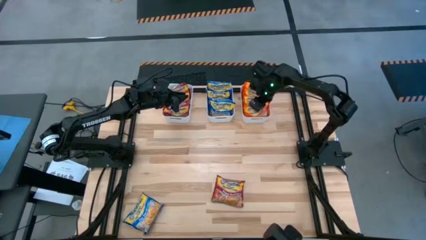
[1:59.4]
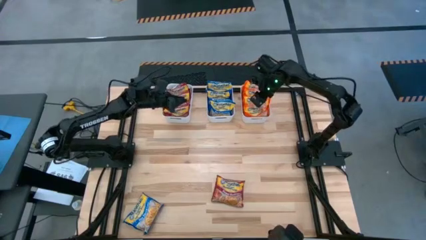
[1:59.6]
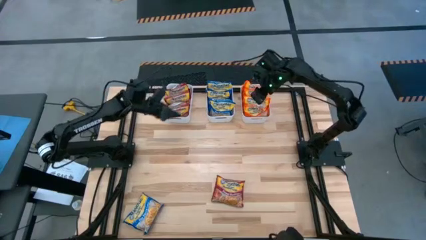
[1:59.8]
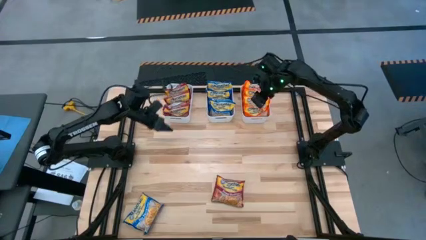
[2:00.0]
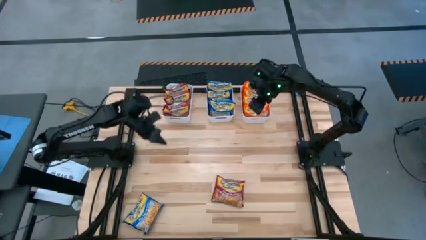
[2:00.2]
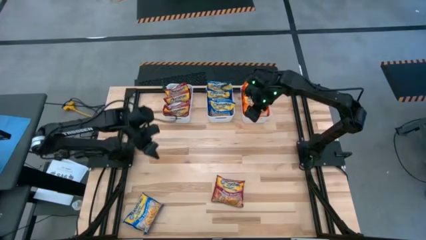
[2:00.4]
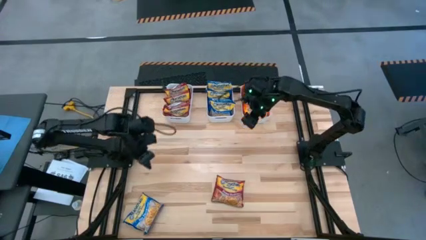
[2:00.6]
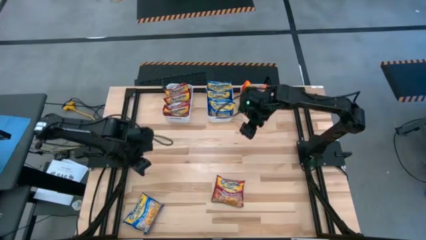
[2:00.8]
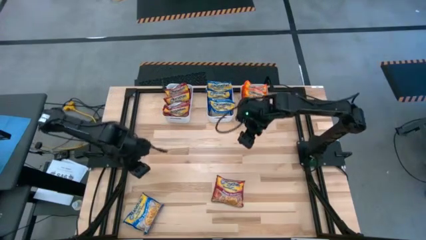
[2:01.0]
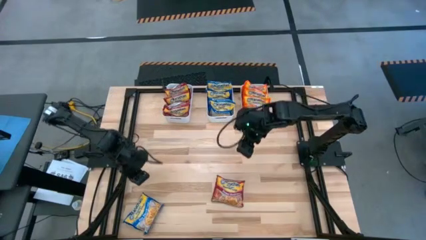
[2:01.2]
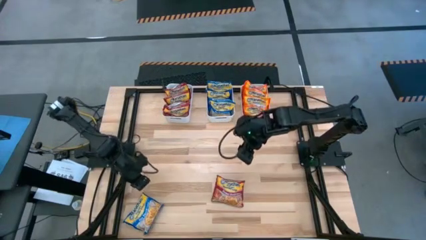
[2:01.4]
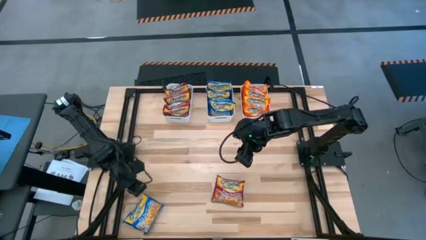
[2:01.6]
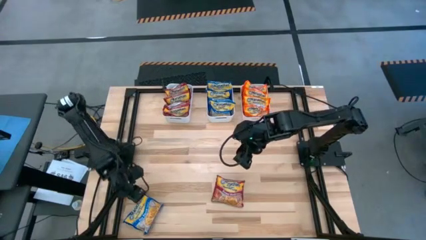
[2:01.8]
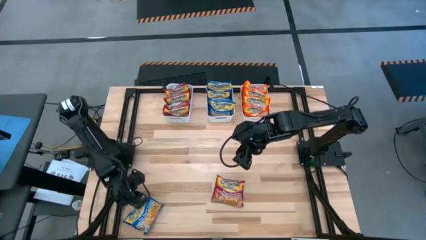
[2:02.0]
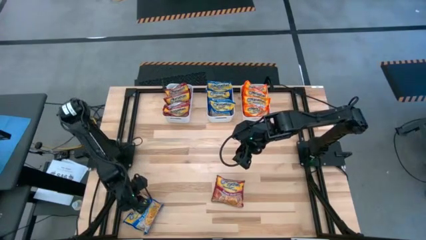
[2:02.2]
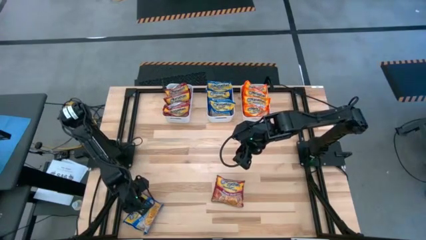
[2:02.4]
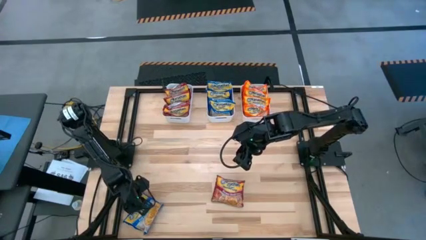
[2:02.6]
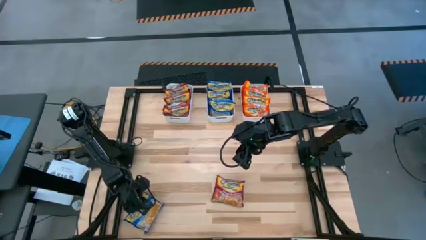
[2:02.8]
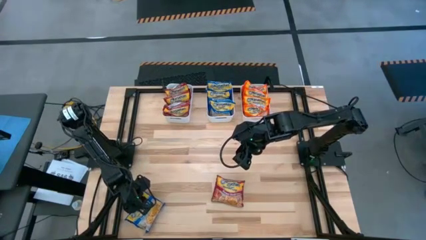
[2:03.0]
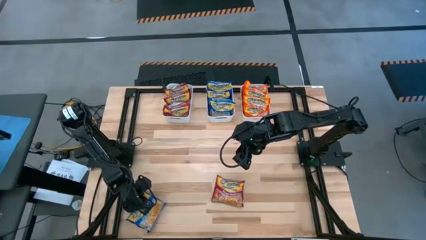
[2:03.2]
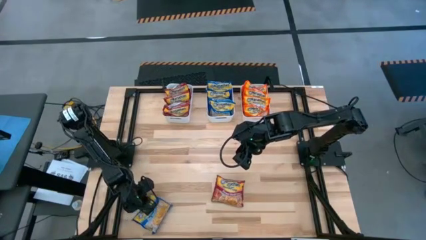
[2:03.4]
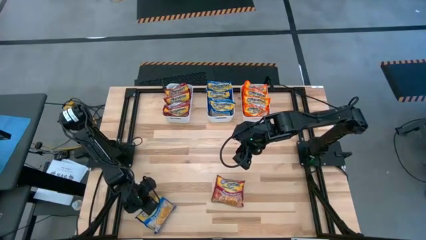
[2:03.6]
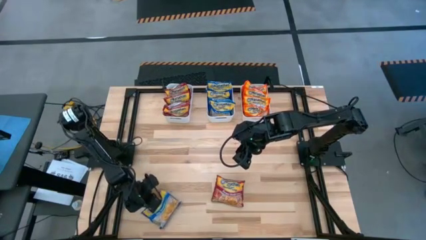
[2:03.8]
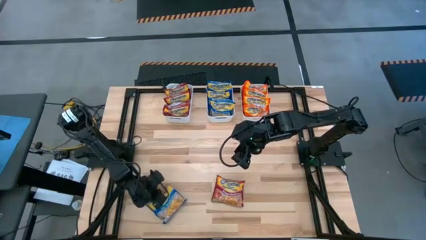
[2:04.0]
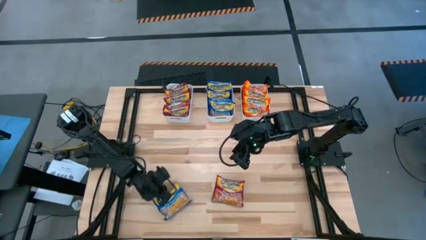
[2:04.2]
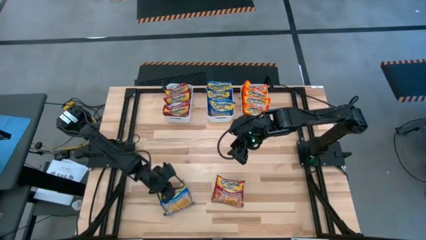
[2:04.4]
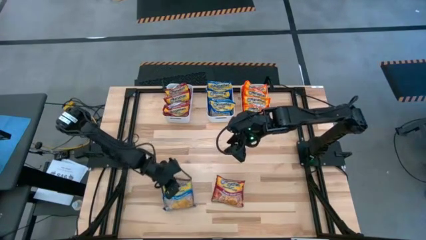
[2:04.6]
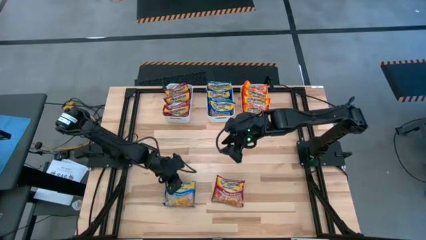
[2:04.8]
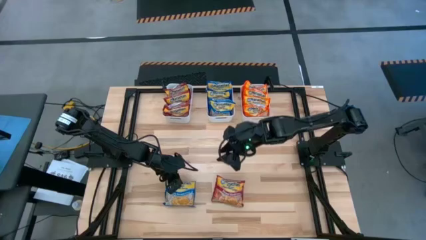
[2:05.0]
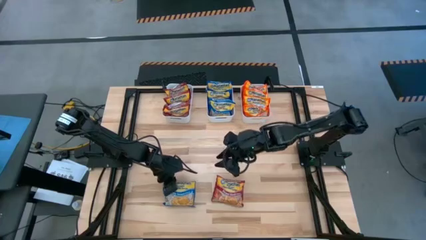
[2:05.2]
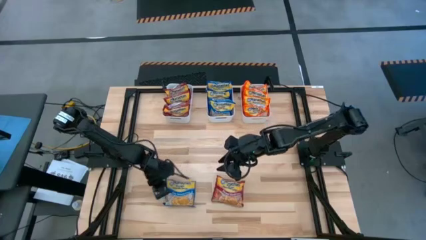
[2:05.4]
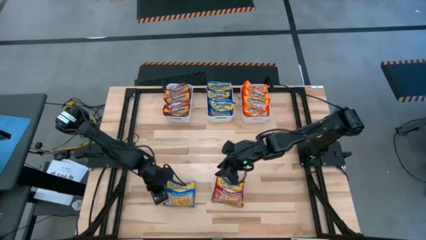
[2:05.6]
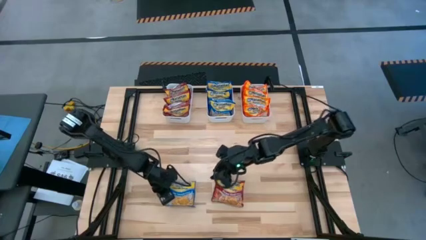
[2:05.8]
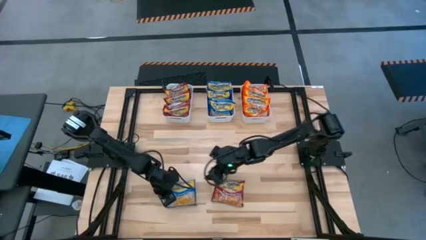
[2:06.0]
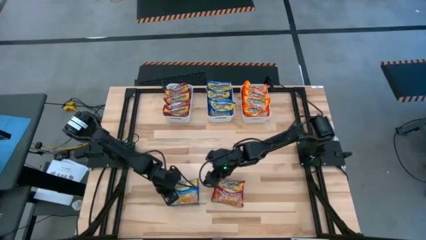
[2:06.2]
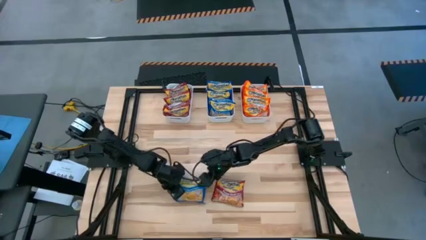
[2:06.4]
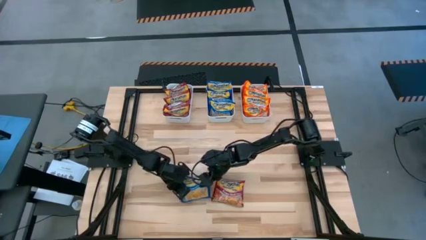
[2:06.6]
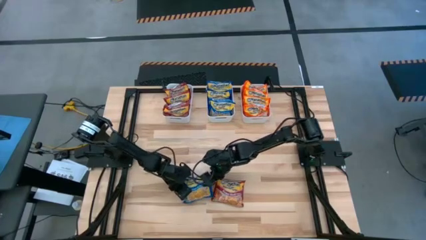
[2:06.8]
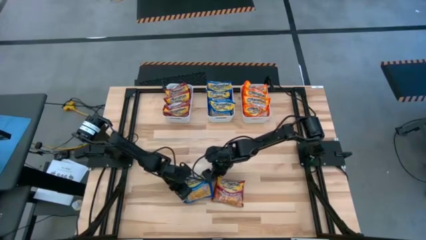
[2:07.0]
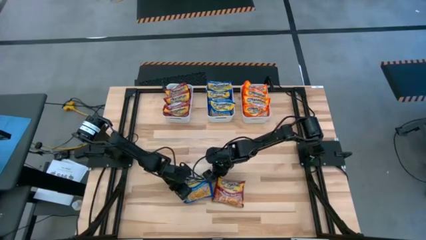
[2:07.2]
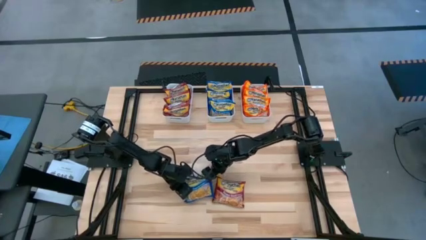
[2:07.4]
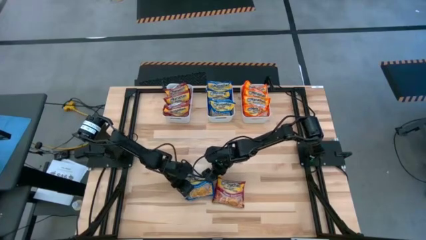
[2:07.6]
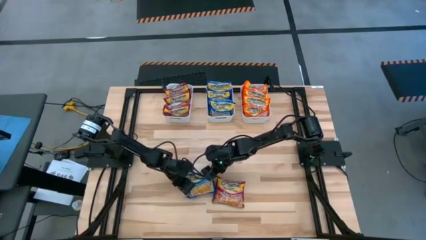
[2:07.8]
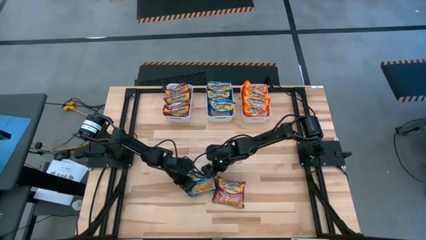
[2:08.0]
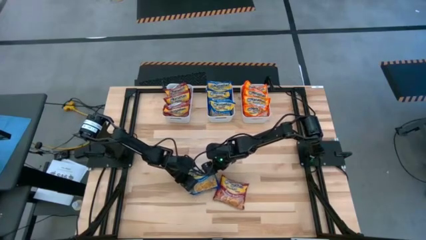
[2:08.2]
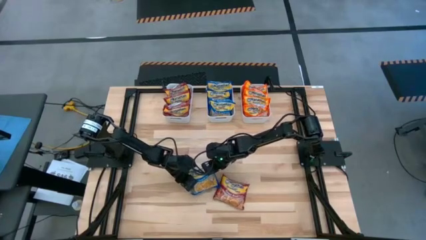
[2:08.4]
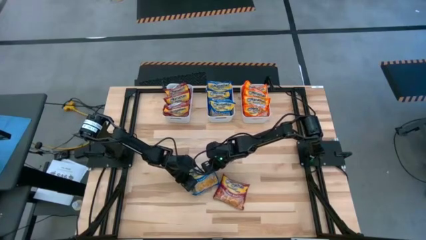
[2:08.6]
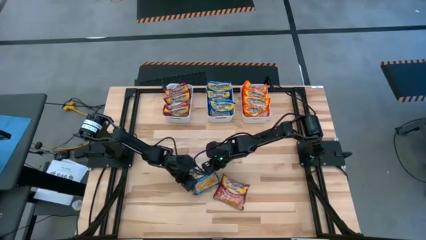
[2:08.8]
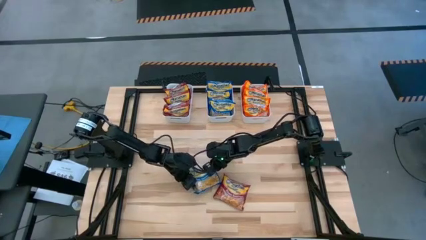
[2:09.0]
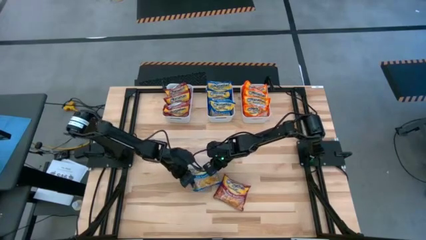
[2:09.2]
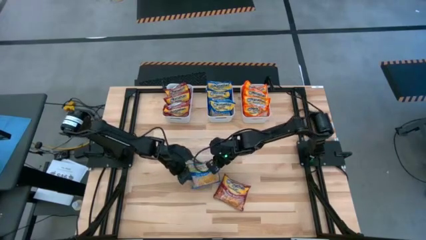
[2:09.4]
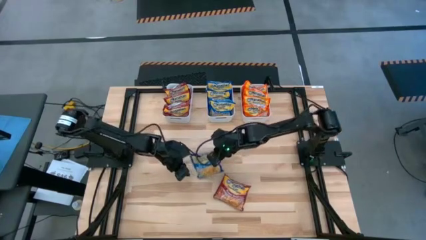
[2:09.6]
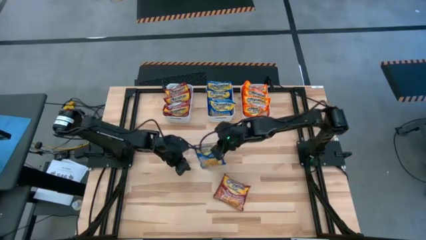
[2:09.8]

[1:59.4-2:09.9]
Task: Sort Maruchan noodles
Put the blue noodle pack into the top middle white bin

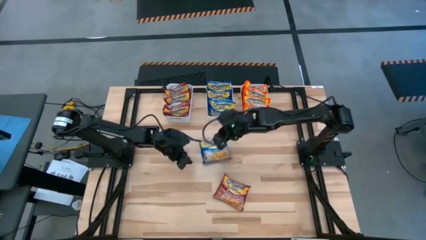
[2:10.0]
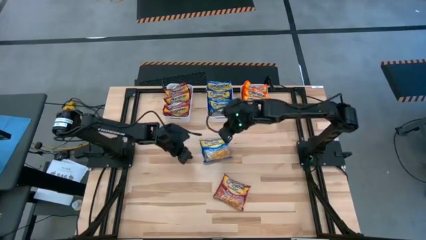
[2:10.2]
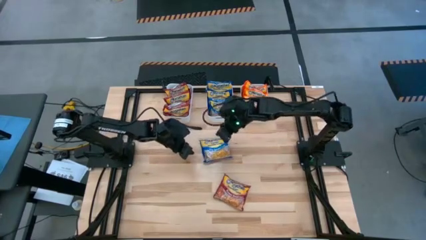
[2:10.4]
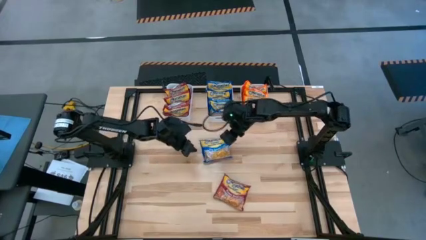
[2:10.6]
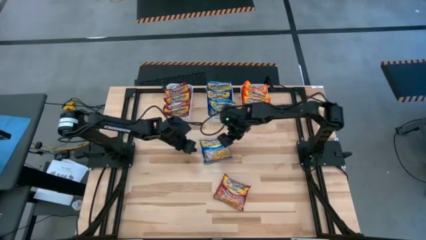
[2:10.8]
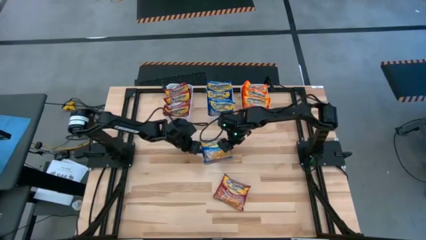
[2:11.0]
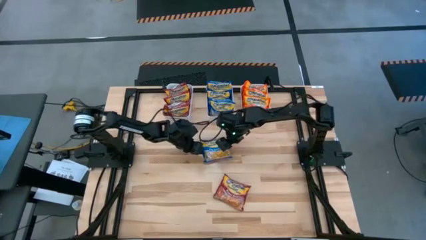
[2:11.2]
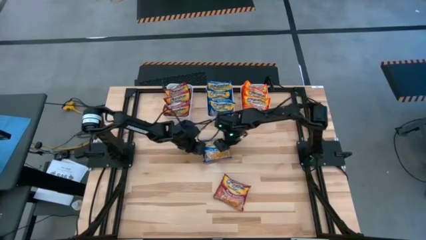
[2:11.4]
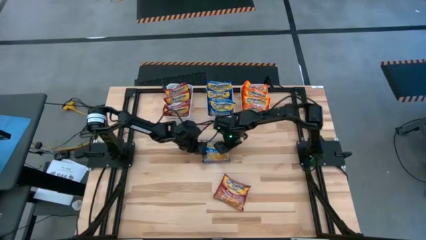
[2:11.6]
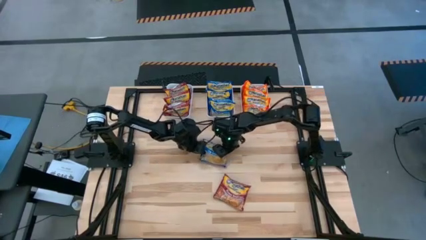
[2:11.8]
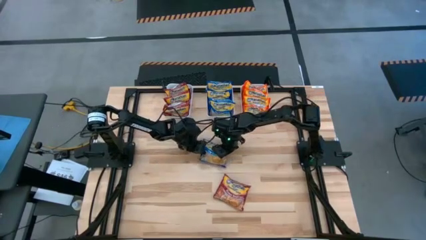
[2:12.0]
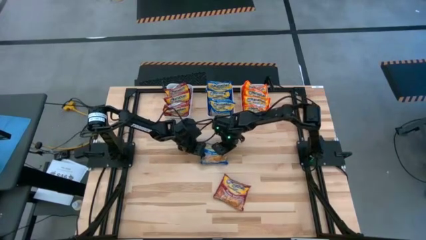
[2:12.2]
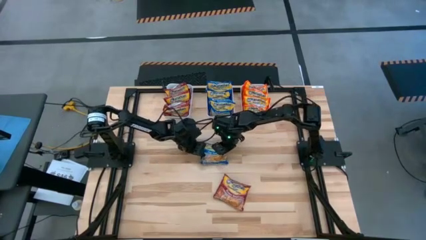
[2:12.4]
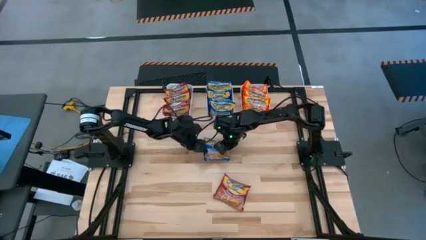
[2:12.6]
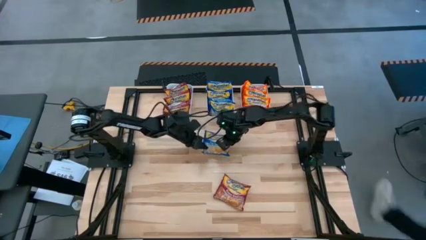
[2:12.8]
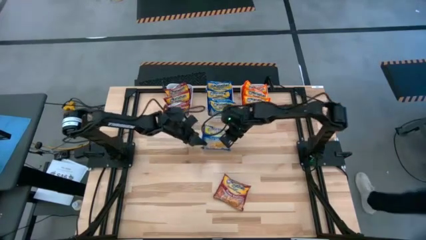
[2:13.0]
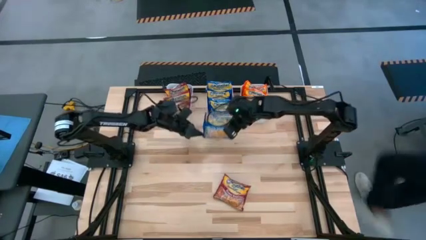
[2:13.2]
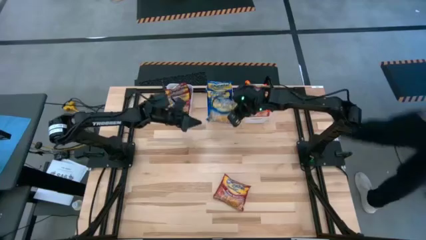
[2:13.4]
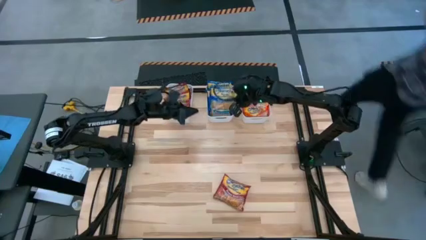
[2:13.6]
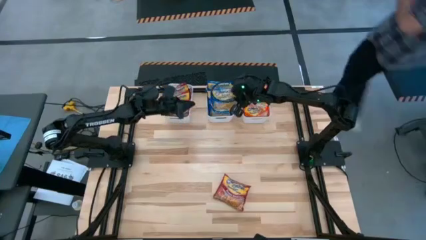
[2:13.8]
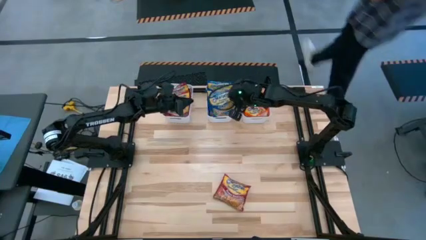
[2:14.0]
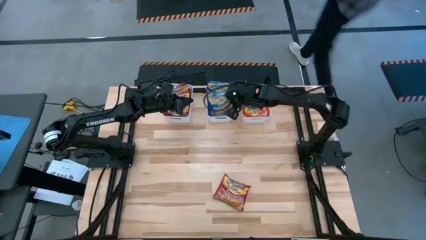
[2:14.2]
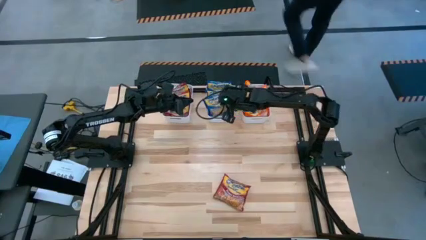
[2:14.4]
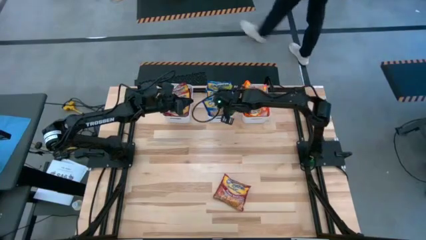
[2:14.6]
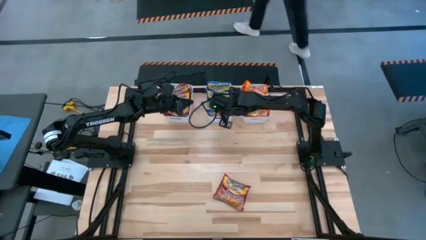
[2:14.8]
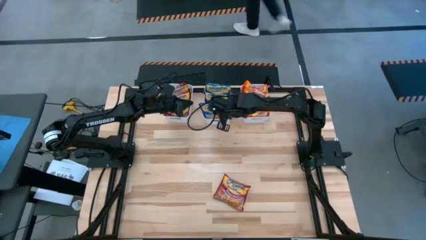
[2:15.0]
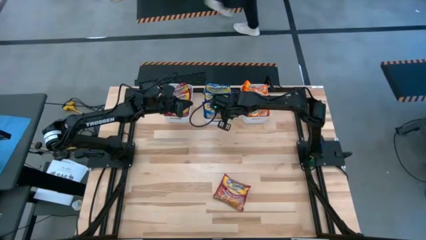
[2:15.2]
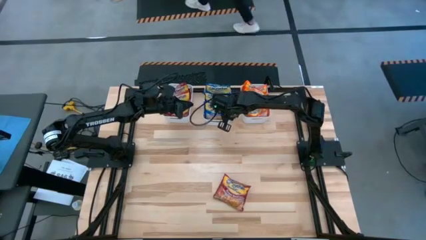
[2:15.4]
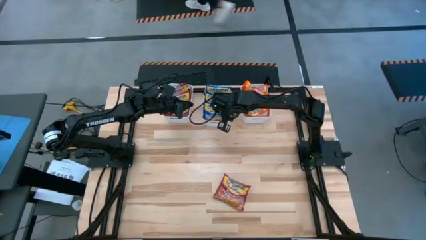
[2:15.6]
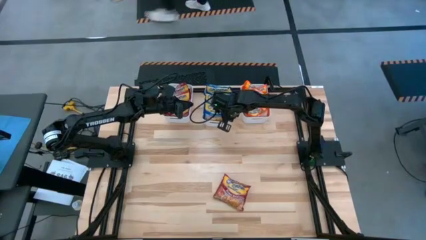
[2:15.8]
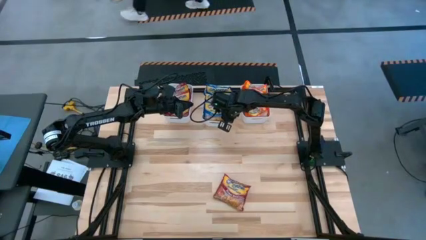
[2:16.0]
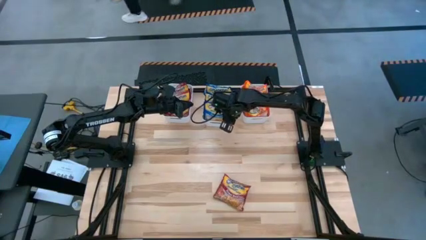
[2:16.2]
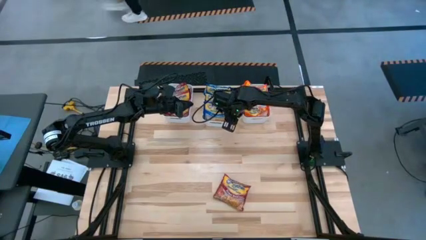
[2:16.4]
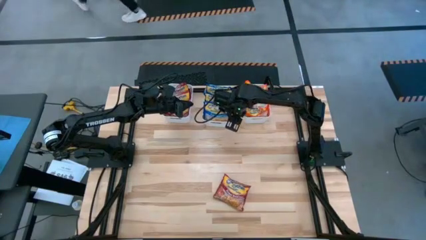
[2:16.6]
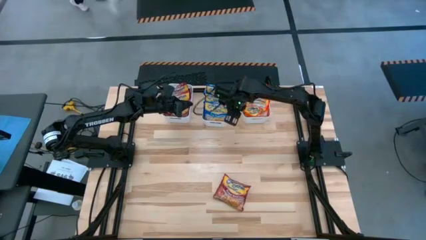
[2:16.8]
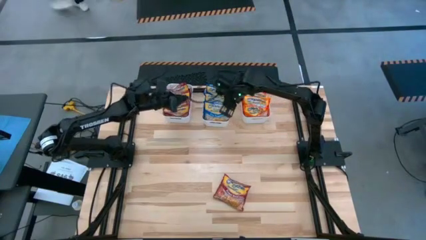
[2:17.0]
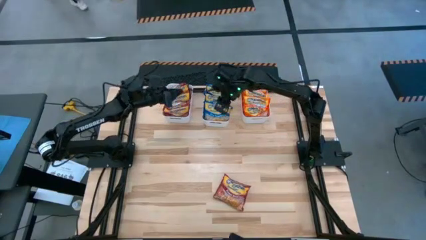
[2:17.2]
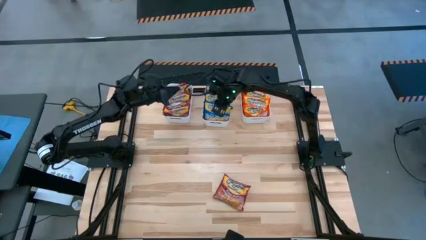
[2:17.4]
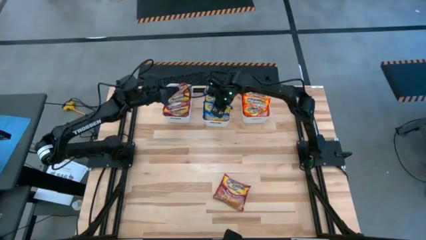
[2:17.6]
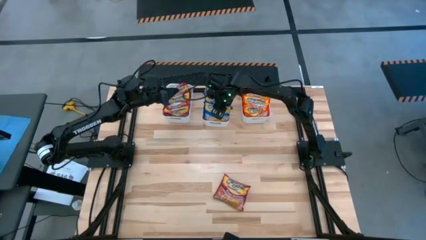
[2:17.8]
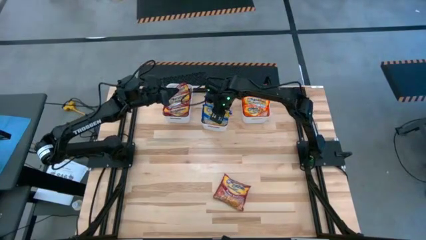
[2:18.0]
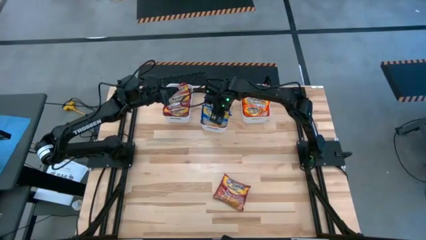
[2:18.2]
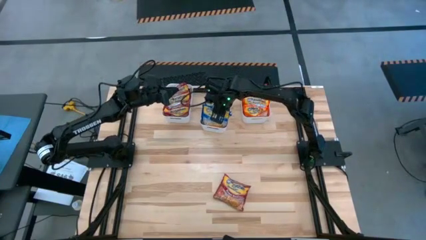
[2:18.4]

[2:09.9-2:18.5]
Put the blue noodle pack into the top middle white bin
